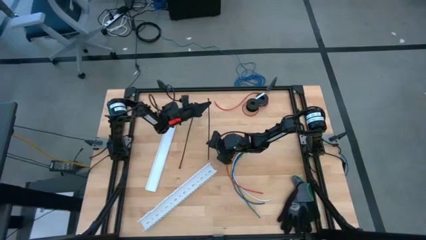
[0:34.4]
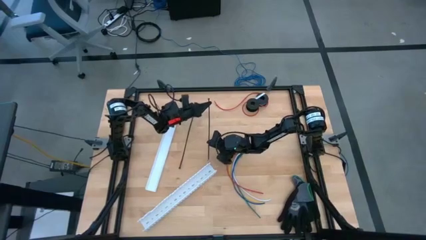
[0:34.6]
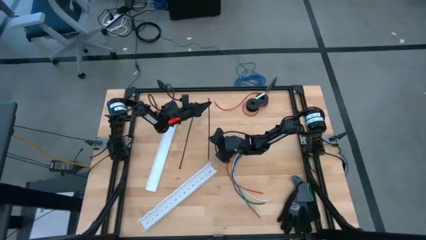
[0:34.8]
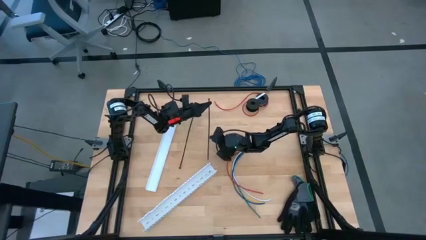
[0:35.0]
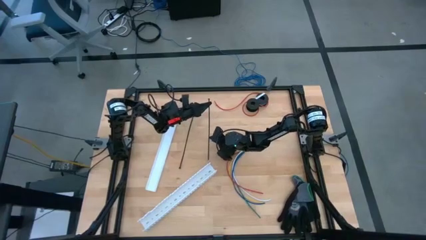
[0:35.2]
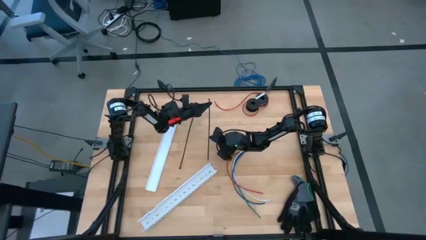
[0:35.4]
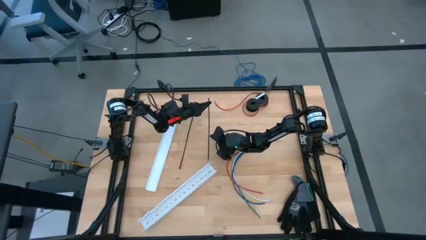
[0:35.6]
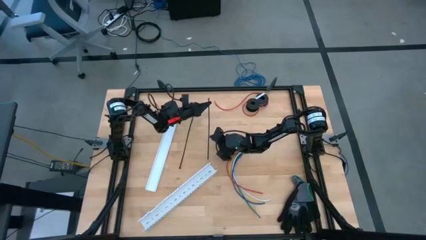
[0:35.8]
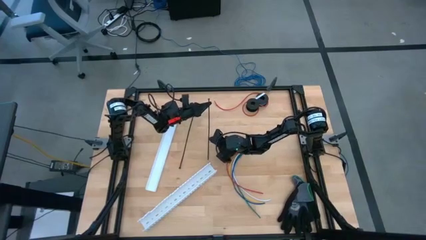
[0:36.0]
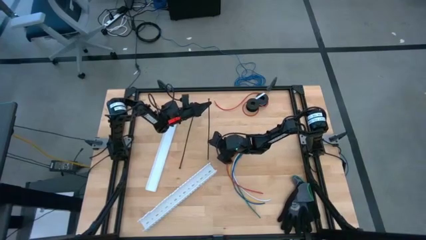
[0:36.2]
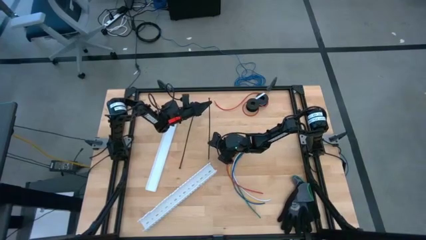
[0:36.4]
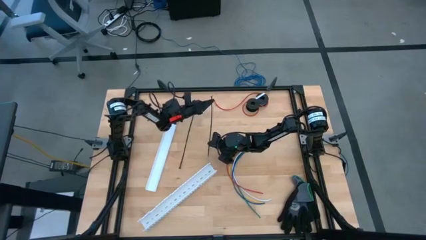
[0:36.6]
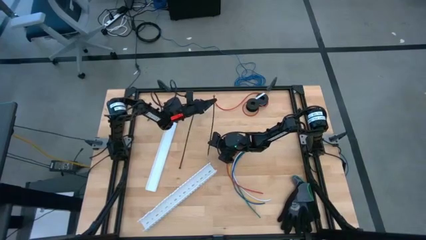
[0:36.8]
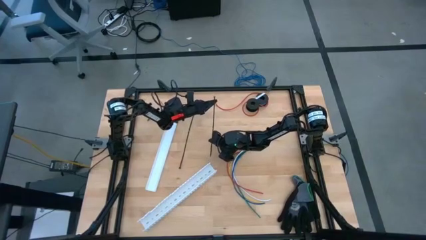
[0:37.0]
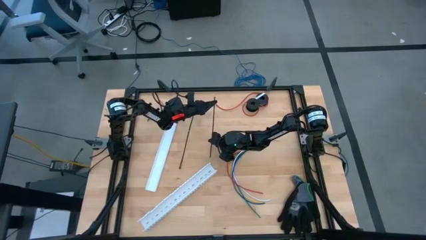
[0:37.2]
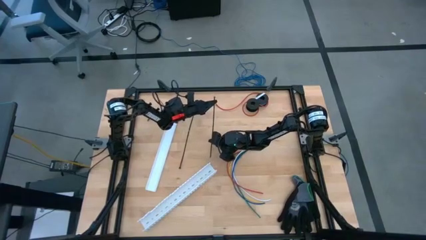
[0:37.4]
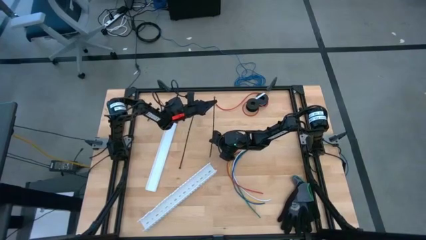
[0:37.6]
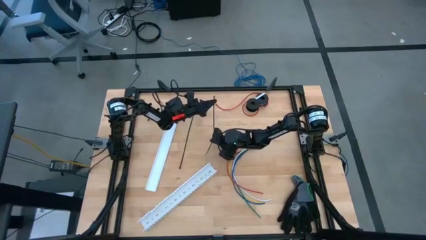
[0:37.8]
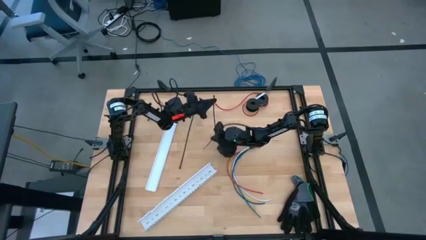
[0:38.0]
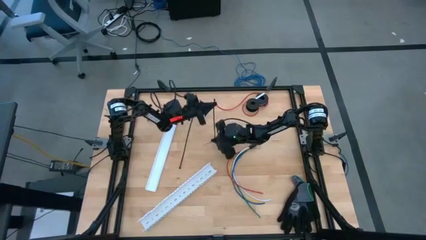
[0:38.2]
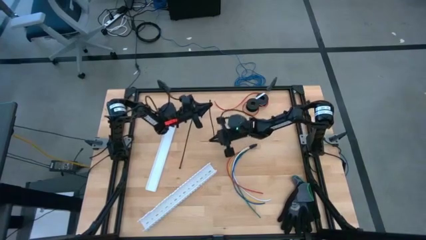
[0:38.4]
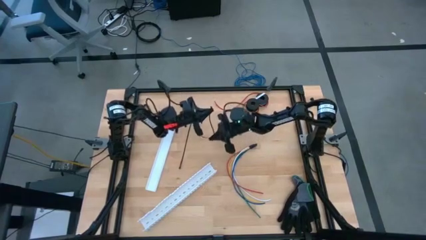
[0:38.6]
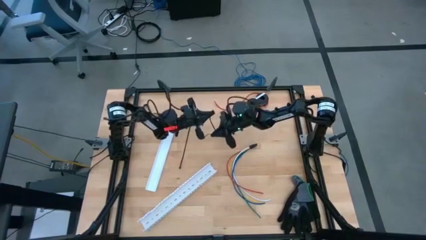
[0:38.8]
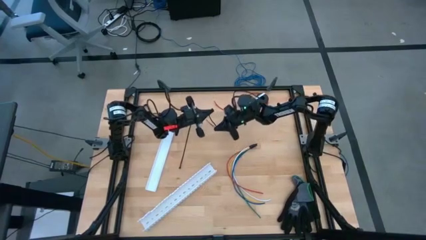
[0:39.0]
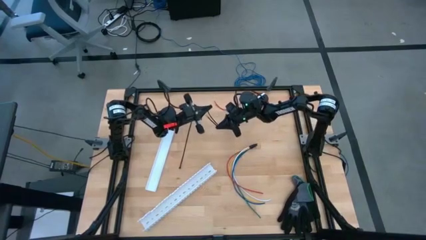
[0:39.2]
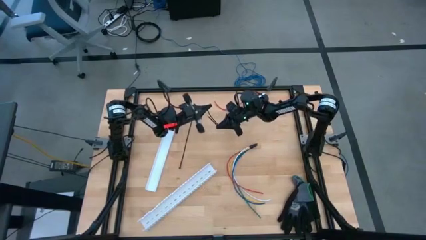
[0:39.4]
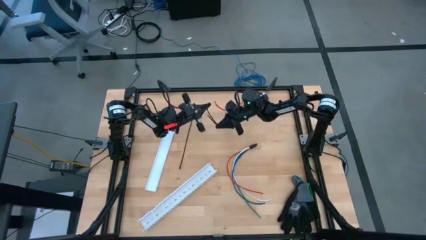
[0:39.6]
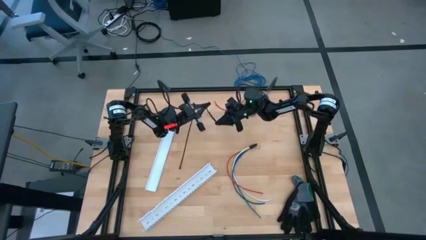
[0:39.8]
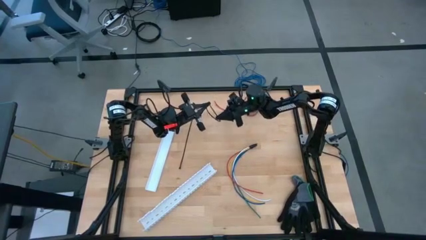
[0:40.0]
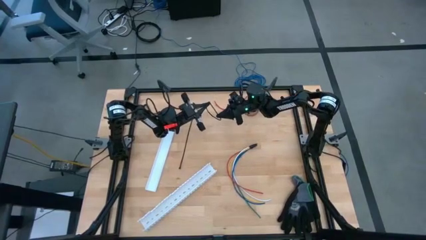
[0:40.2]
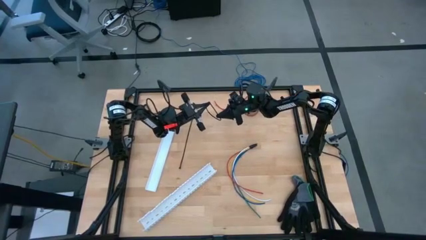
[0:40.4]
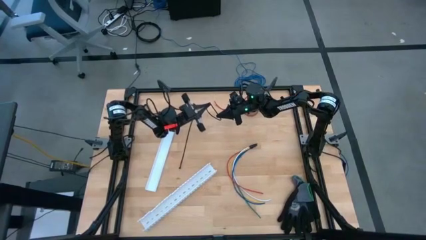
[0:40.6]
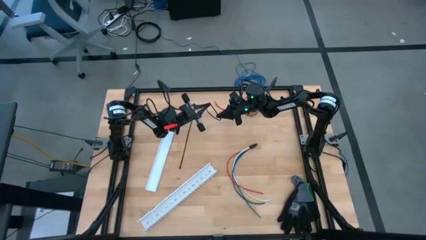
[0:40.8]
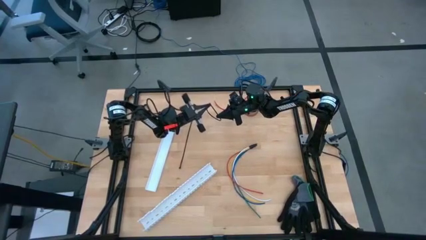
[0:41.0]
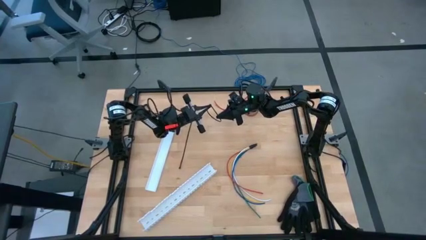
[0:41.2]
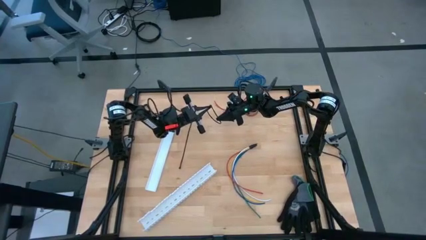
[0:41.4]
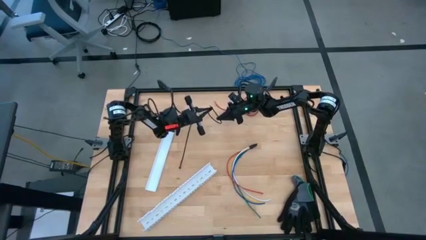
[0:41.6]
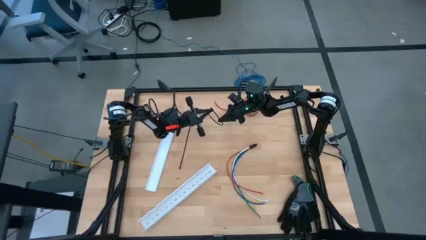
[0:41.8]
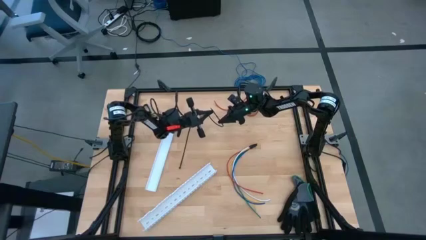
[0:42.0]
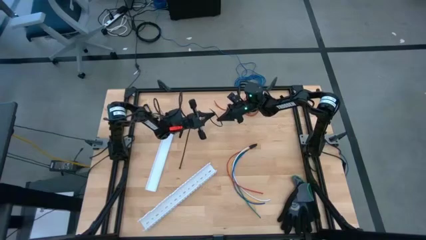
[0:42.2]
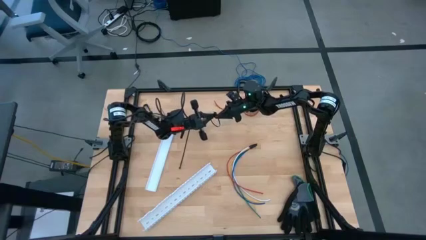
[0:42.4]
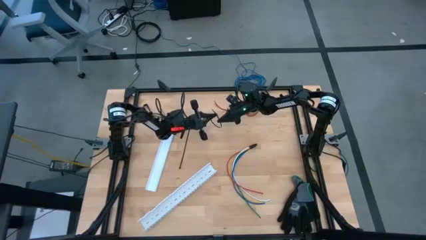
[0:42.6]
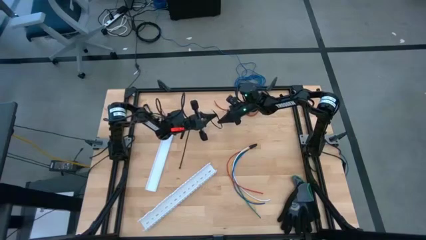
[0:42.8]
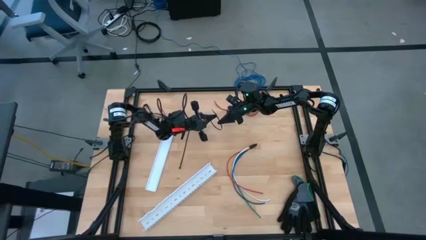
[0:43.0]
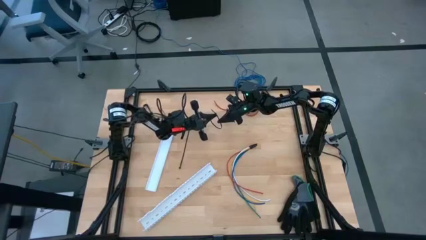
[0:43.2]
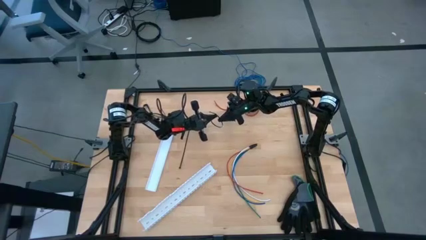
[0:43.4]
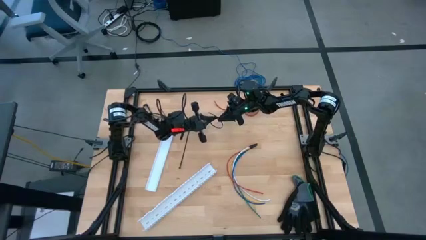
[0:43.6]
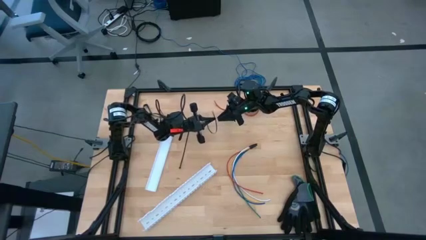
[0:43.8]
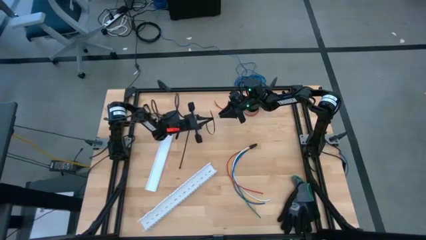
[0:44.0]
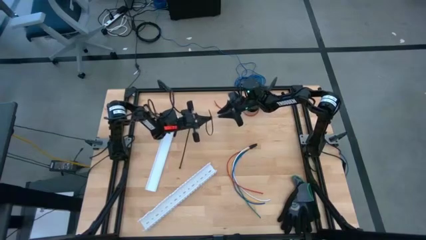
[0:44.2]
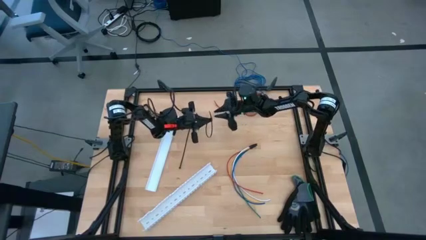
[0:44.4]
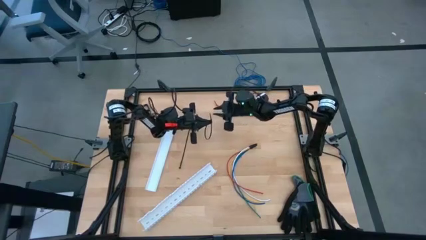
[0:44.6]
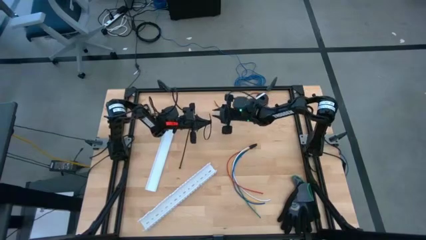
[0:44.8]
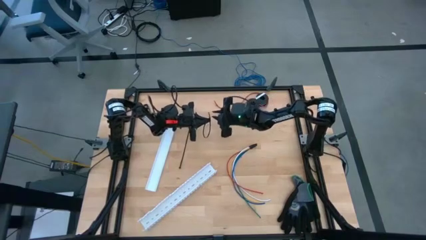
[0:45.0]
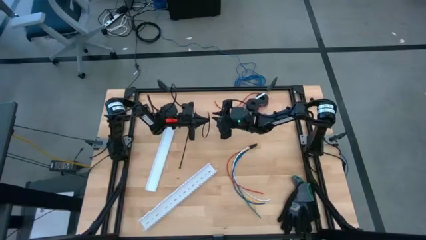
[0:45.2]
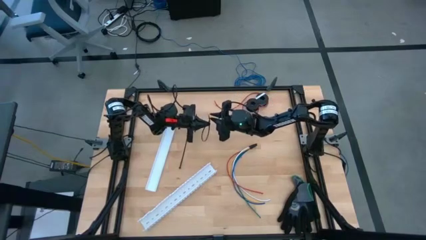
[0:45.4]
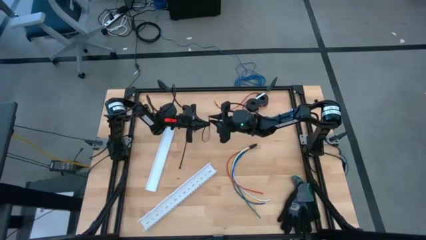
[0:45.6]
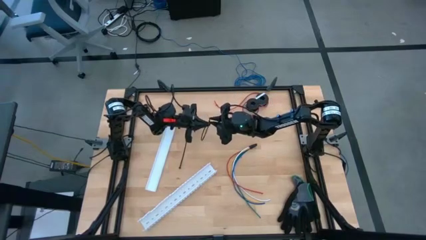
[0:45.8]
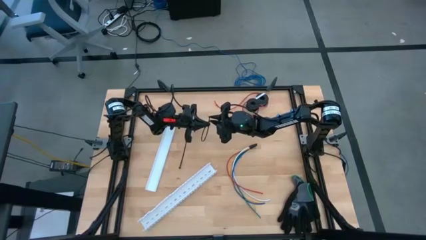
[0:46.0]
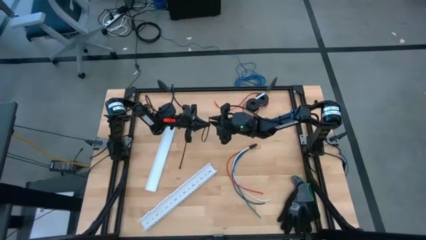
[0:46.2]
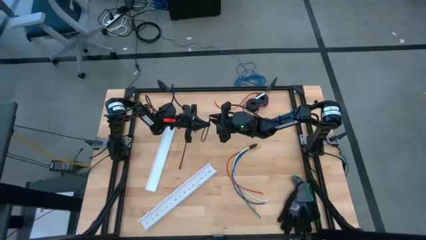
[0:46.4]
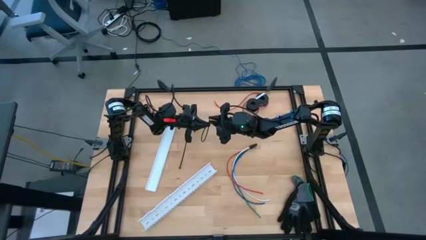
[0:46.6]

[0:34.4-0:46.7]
Task: Ziptie cables
Wrap the right black zip tie

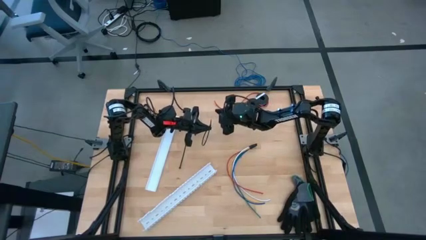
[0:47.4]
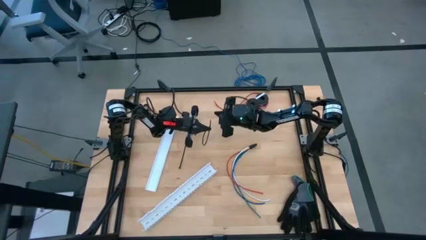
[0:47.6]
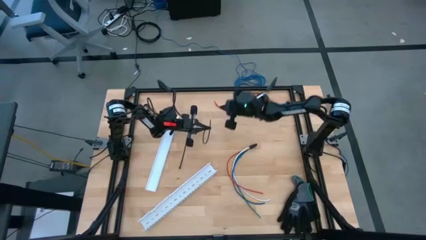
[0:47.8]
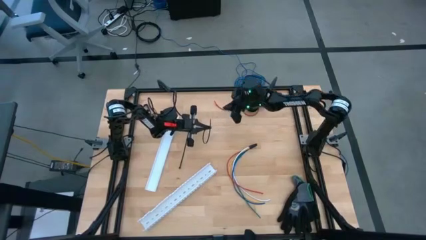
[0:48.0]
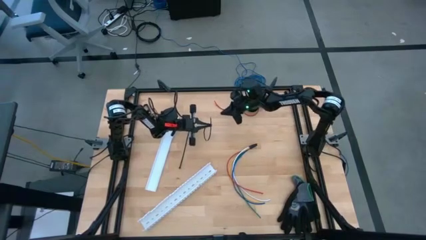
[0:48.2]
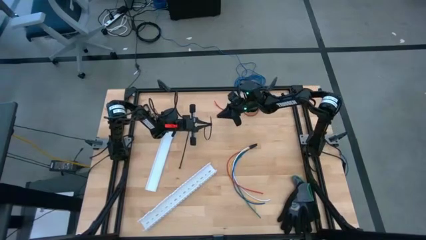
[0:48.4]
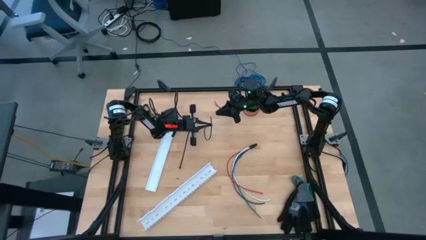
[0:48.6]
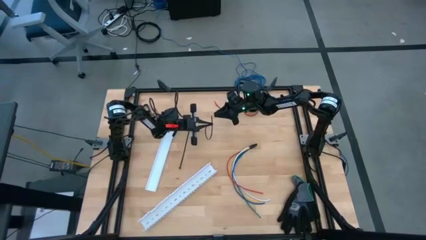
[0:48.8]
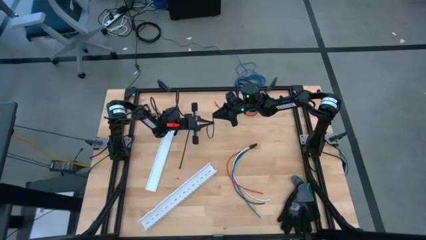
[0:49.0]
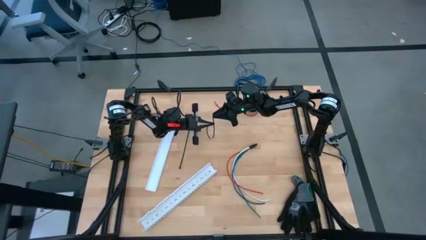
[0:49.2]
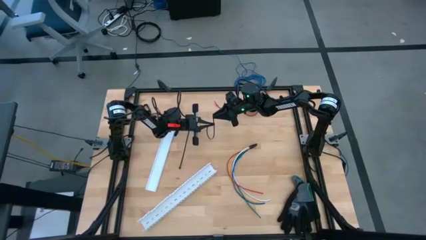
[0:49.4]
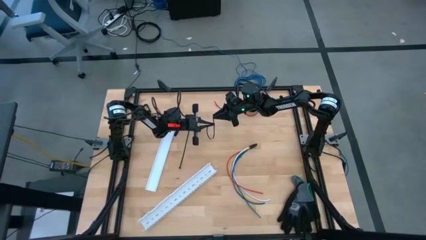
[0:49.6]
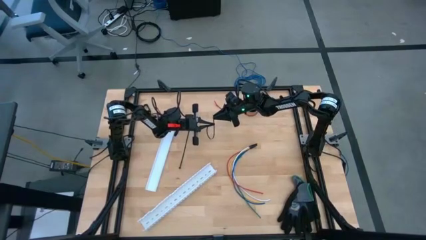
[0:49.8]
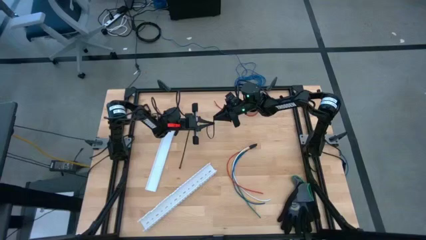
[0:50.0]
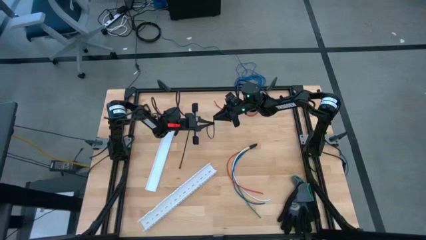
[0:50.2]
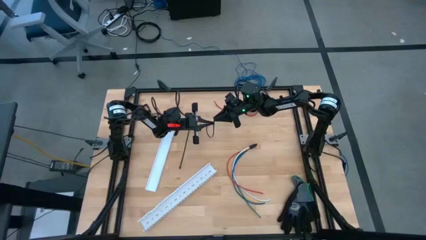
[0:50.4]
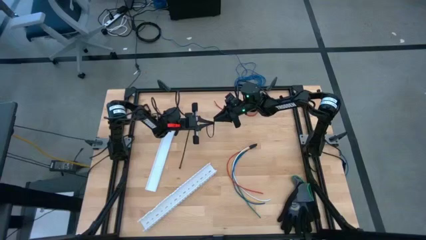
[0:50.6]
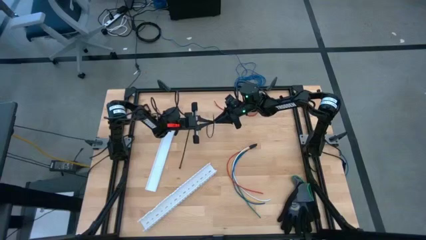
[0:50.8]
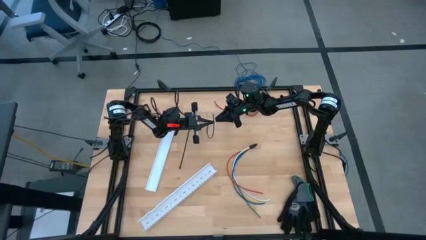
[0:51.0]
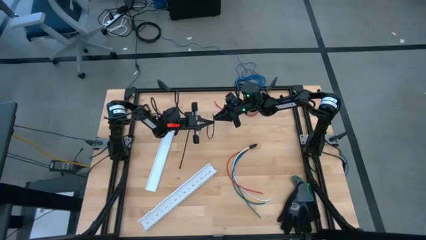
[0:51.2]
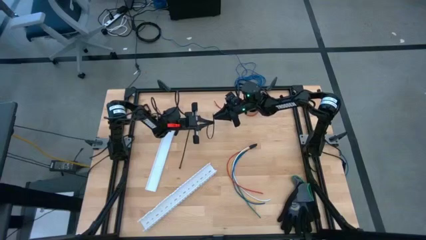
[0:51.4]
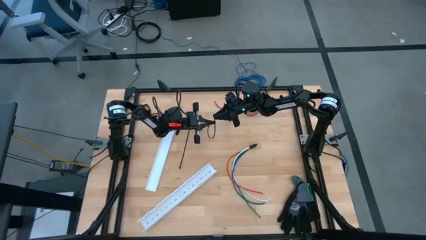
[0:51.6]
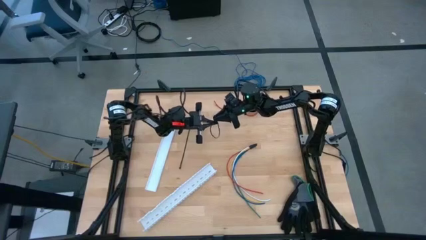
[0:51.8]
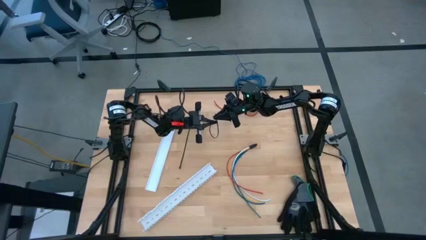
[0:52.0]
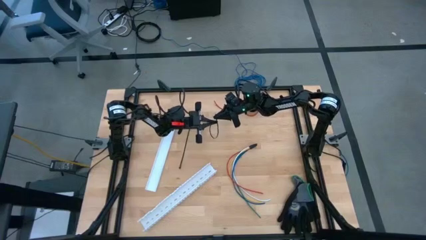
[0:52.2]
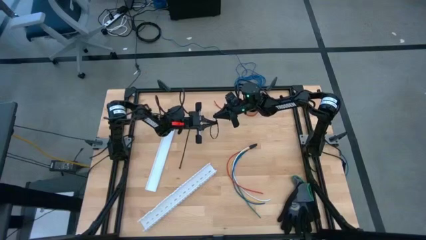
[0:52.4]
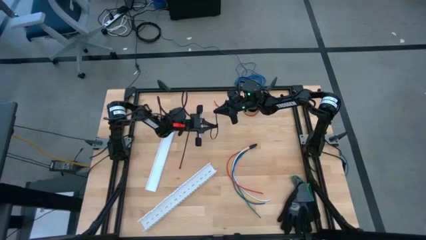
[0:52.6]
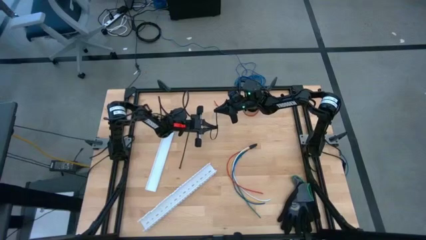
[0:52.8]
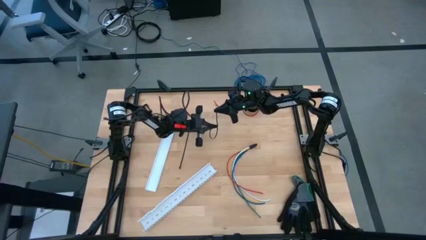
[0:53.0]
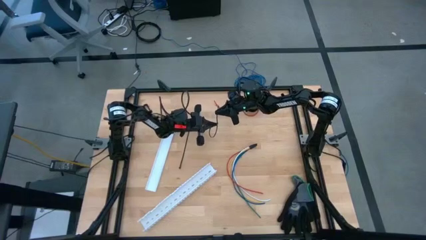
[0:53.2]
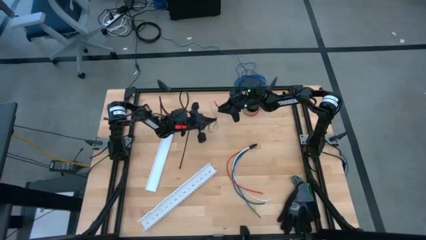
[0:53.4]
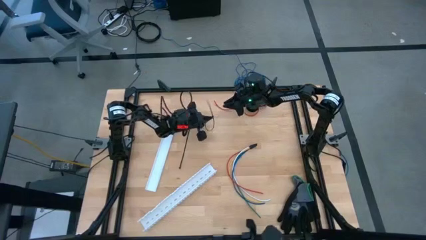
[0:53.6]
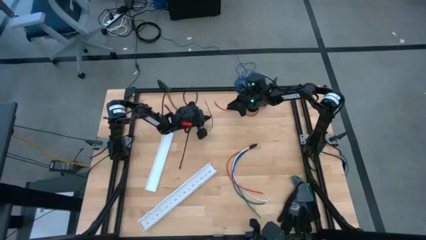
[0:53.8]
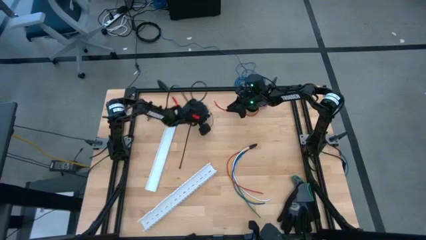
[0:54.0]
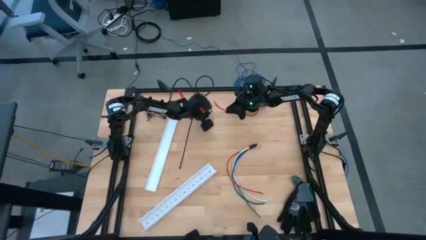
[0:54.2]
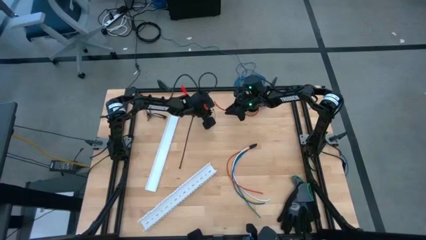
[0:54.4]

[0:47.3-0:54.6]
Wrap the right black zip tie
